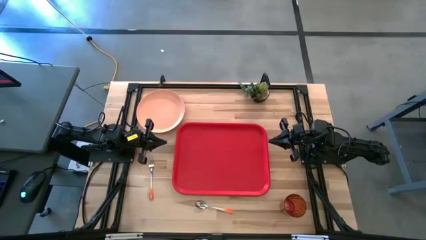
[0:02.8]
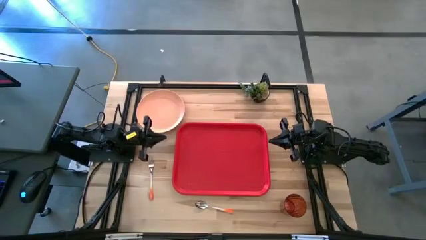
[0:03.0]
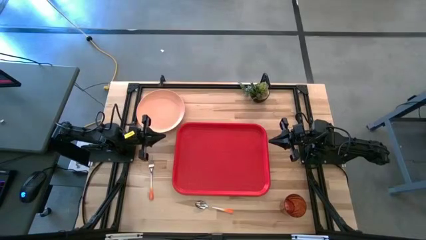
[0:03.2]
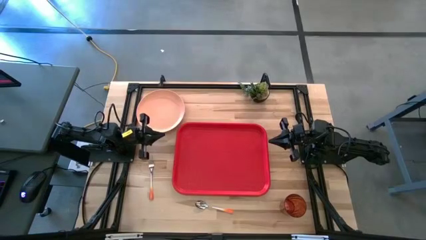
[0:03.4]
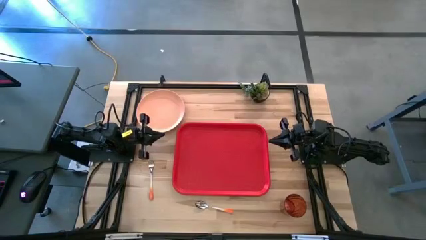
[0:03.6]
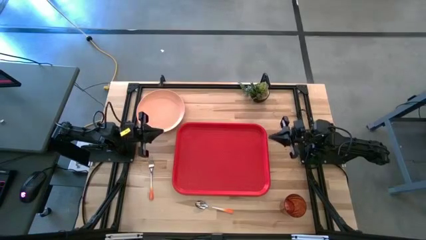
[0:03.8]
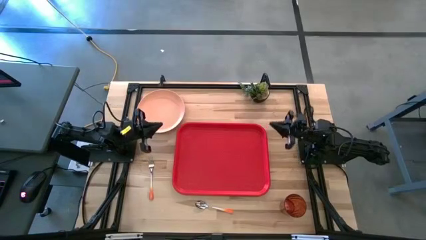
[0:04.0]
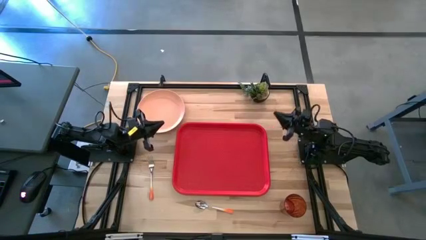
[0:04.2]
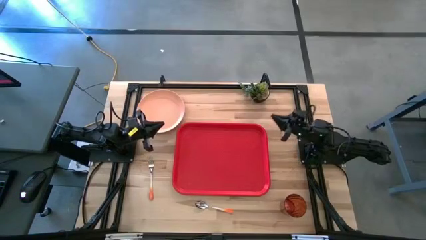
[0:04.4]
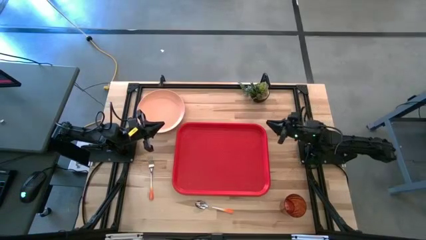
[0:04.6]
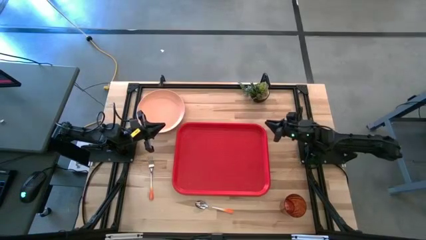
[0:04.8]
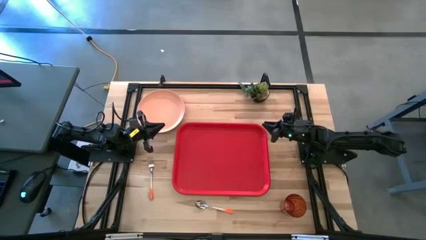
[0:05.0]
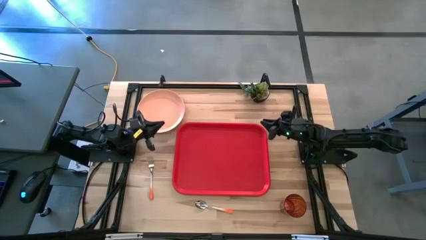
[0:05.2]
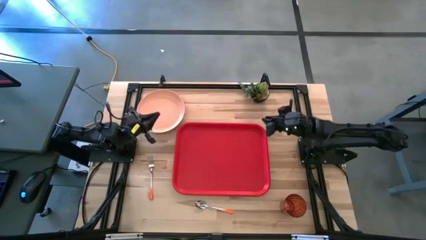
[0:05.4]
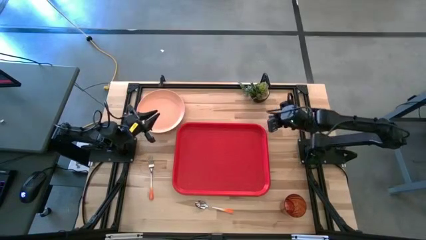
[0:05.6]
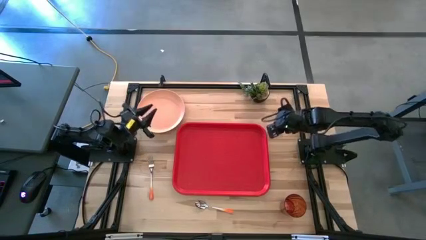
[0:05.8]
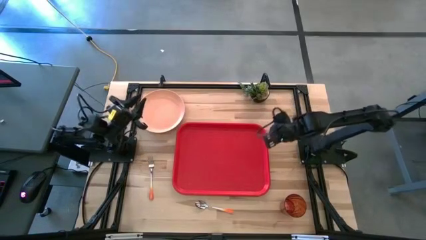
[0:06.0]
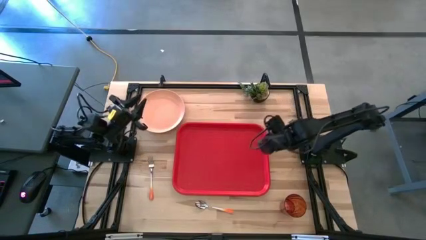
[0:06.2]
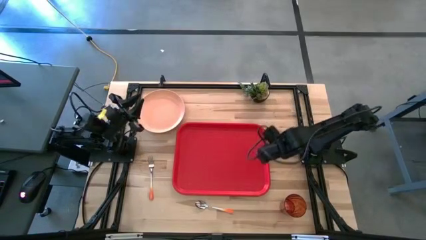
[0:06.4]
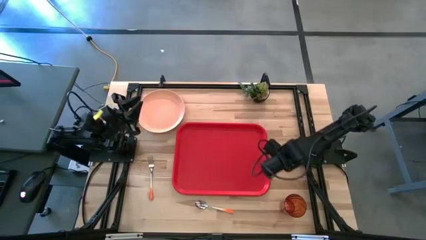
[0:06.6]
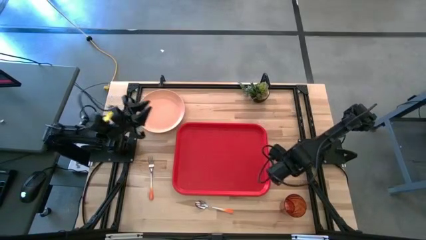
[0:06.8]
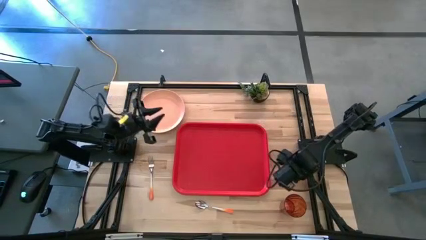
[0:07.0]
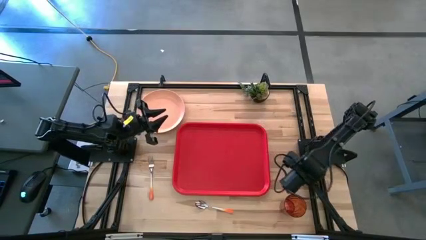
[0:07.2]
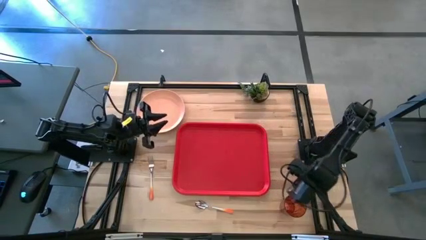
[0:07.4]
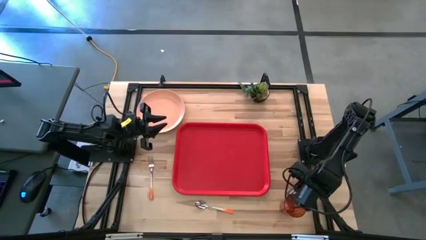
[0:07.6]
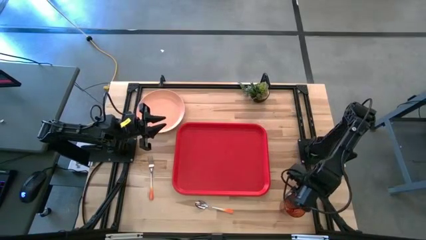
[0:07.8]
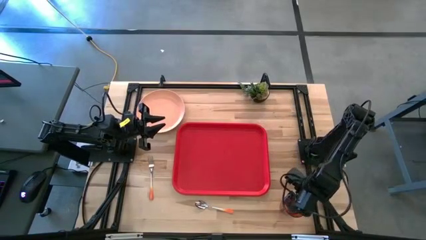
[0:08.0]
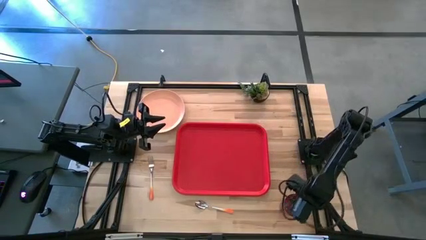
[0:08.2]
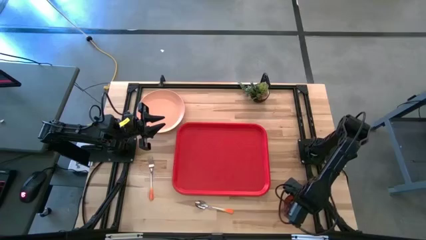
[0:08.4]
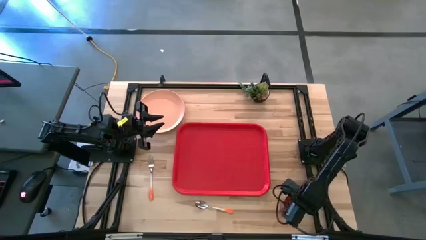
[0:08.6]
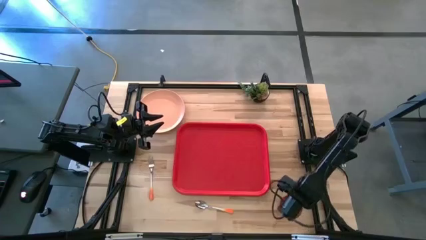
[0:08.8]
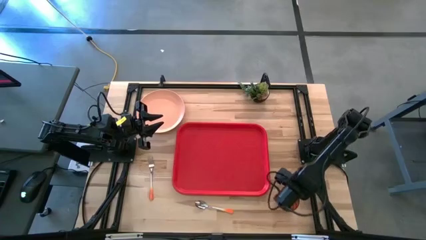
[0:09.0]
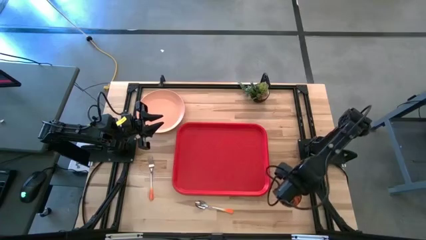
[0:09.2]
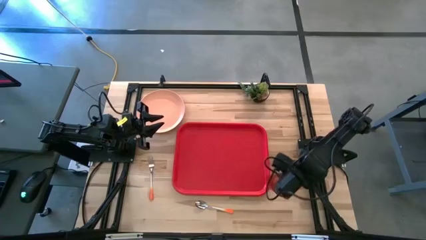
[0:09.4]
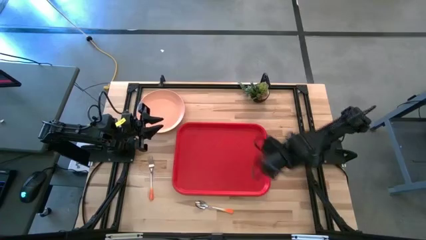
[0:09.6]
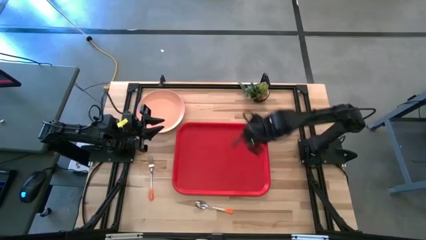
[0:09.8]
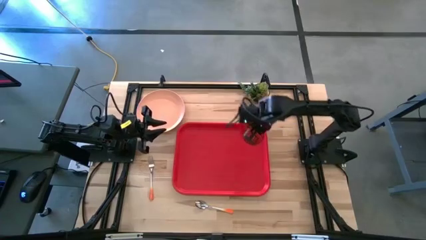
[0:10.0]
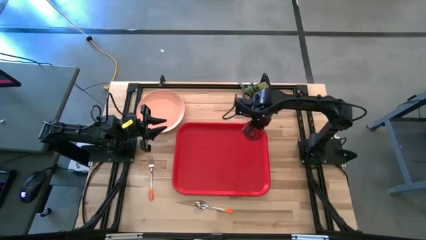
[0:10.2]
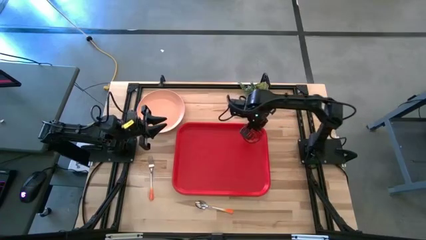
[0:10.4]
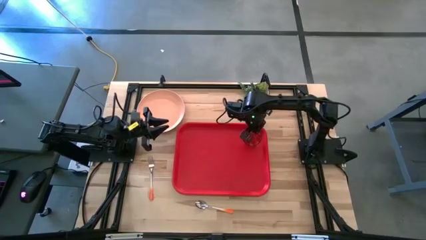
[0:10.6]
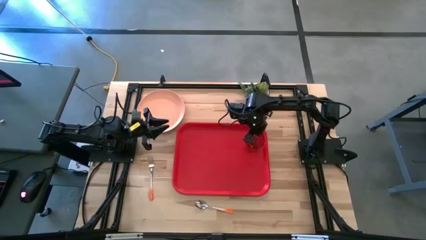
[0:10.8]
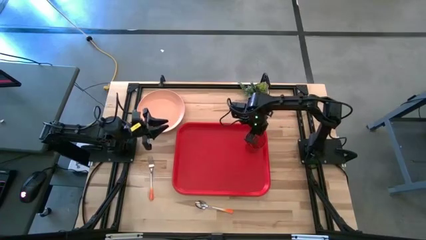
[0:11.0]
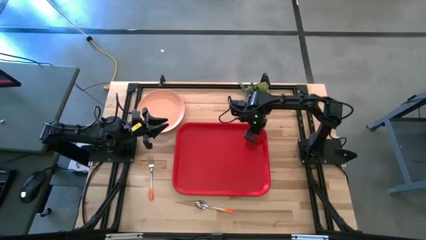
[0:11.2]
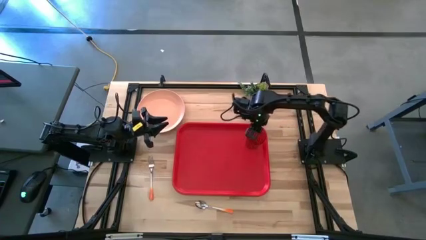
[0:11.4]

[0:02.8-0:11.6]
Task: Pick and place plate/cup/fork/spoon on tray
Put the red glass on the top right of the red serving tray

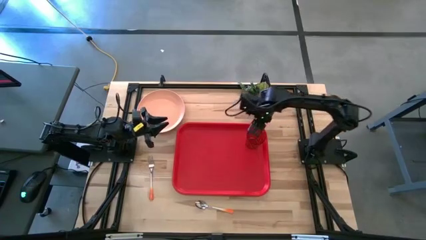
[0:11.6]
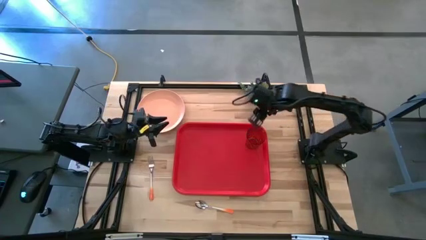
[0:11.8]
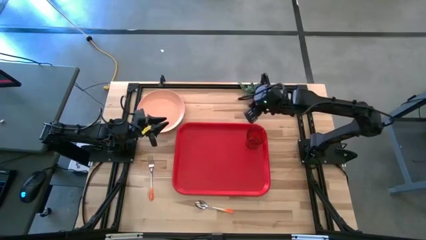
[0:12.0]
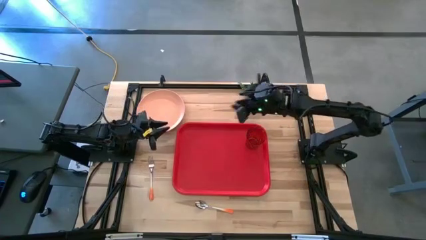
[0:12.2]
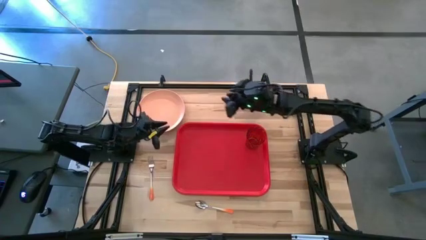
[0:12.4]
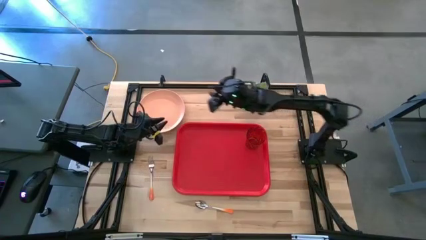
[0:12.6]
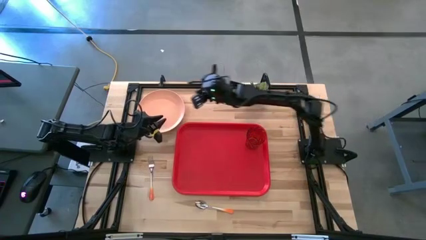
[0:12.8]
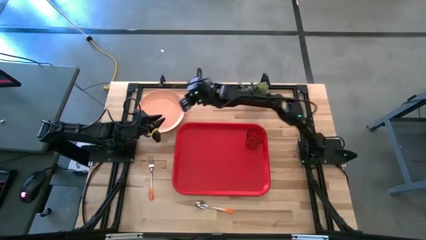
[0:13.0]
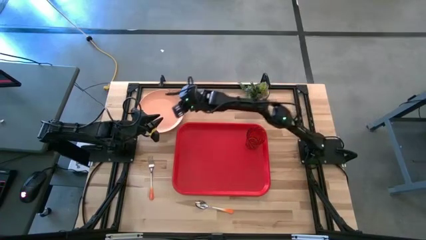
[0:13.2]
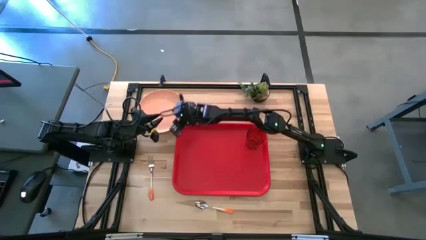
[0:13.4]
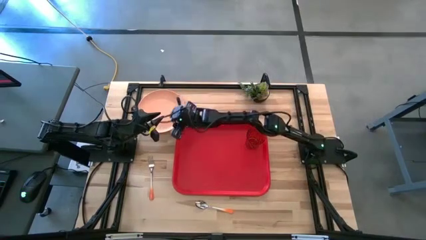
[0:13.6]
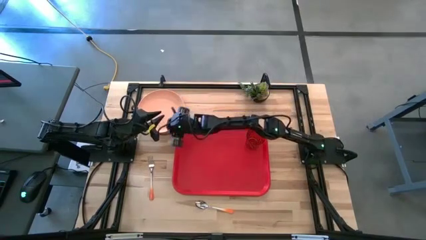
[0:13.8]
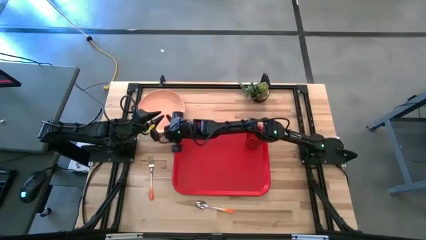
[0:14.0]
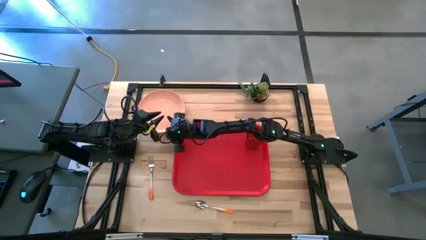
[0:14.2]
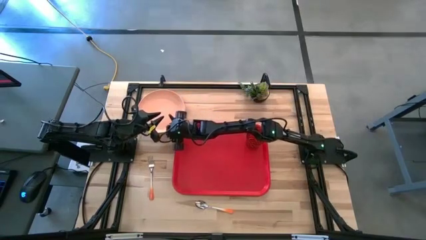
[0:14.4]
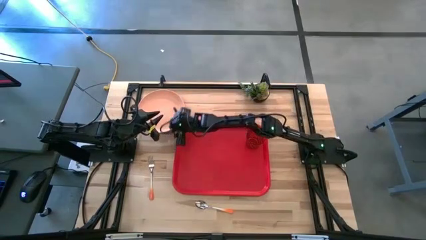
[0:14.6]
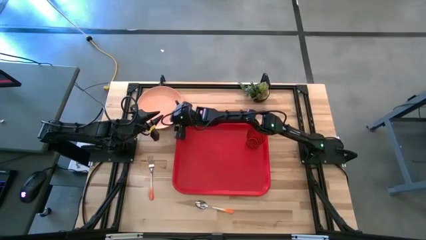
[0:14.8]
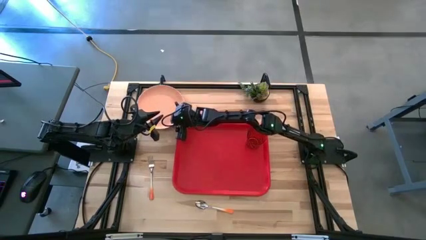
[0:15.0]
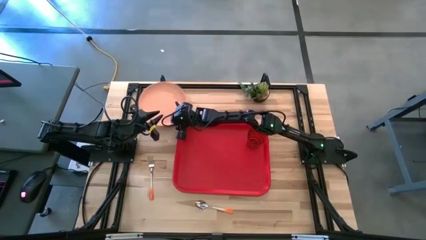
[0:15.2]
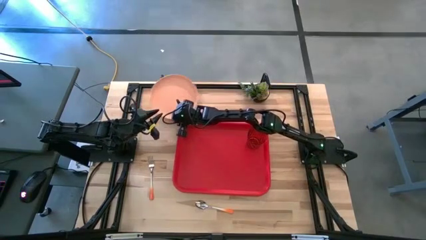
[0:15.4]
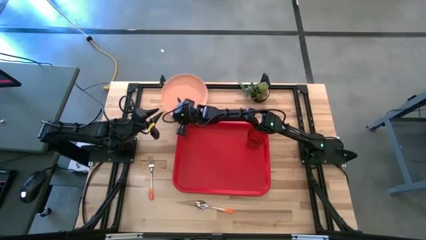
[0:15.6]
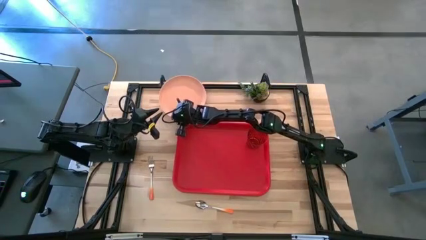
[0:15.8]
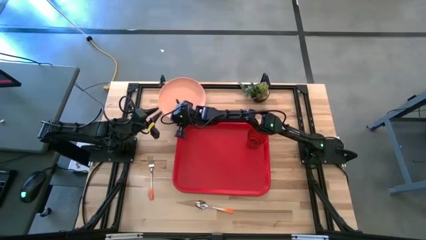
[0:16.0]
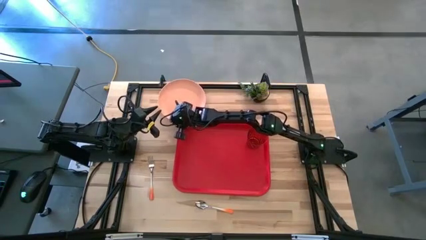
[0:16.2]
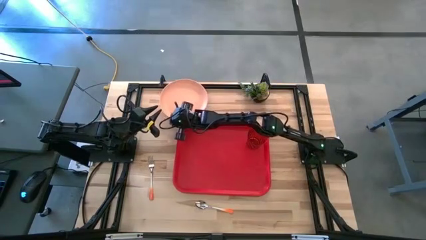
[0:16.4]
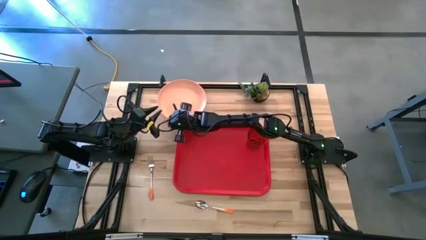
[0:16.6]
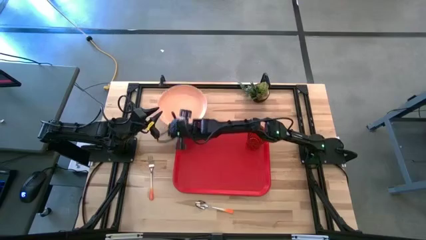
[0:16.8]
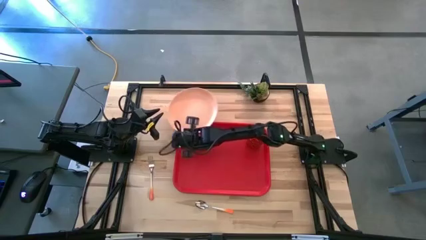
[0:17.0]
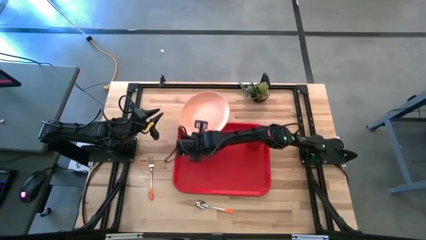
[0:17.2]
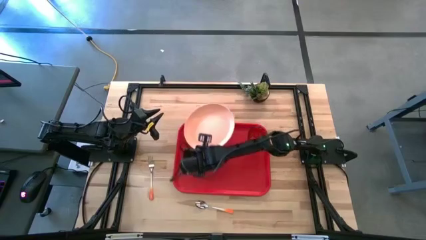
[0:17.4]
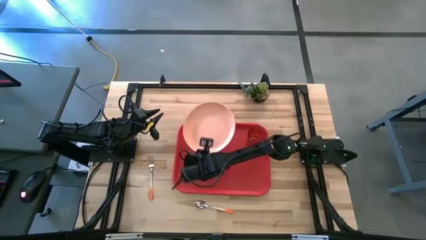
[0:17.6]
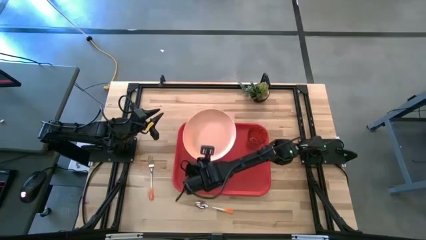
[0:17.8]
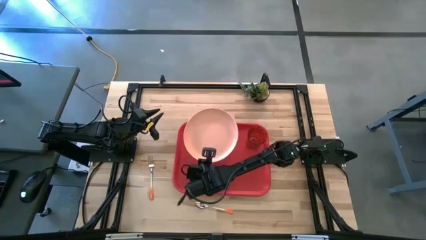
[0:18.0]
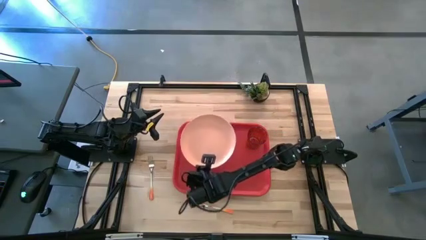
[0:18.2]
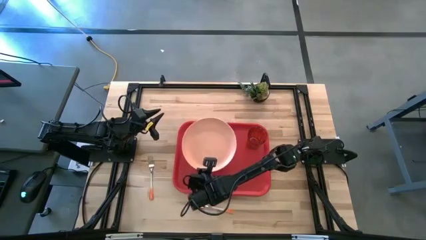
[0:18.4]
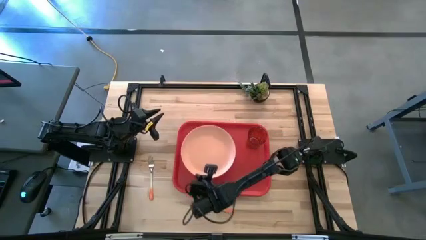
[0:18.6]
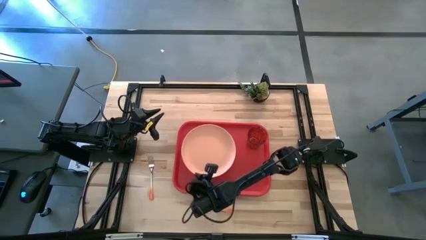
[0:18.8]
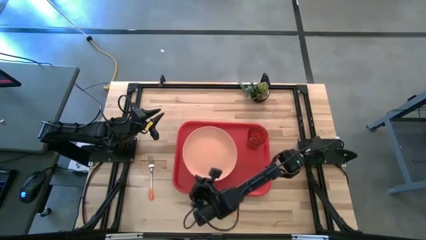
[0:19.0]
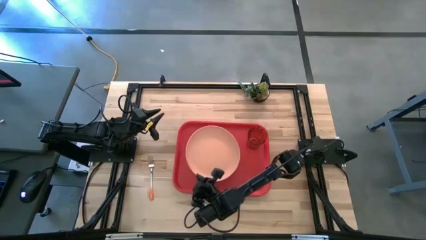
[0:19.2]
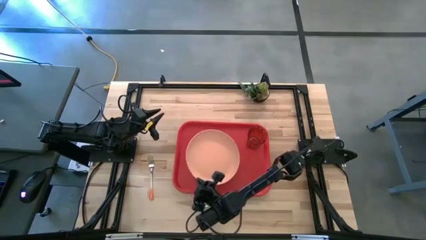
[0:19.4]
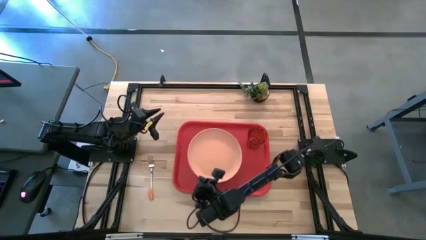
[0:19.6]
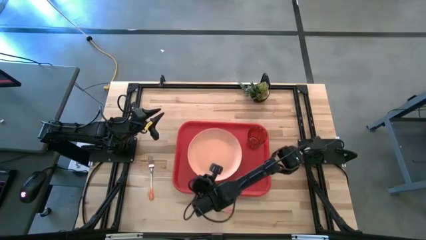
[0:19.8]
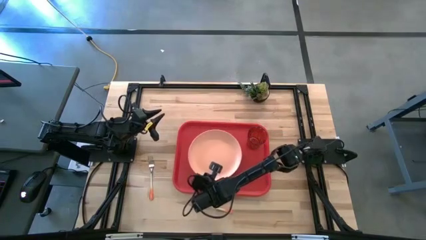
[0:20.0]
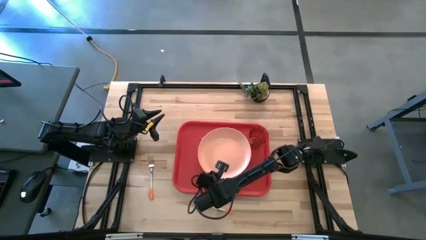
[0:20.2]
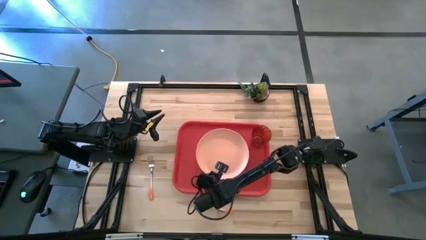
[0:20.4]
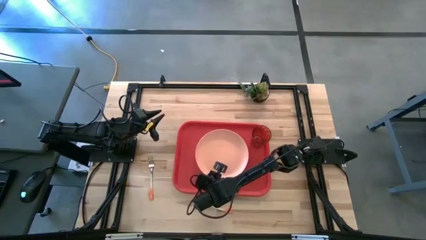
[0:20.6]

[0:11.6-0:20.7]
Put the orange plate on the red serving tray at the bottom left of the red glass
